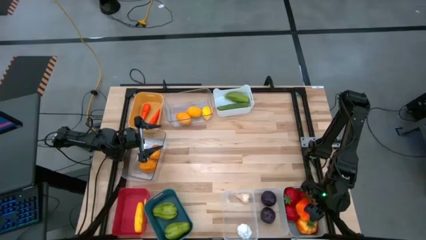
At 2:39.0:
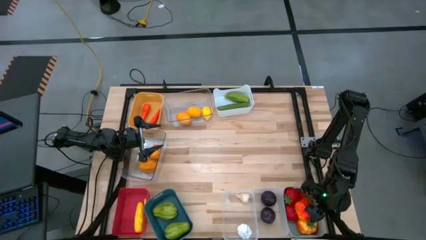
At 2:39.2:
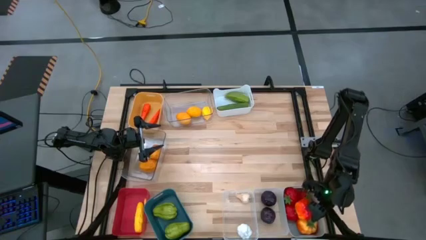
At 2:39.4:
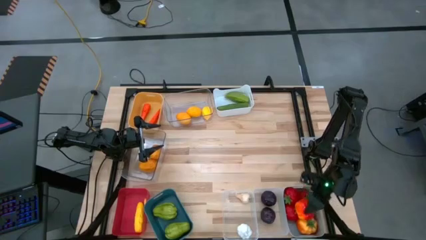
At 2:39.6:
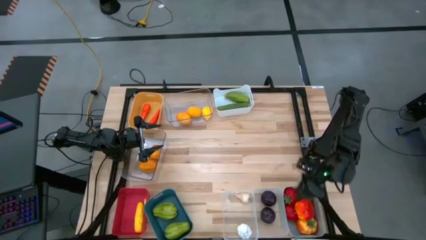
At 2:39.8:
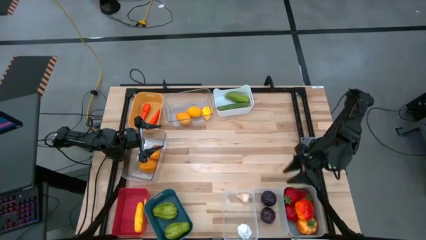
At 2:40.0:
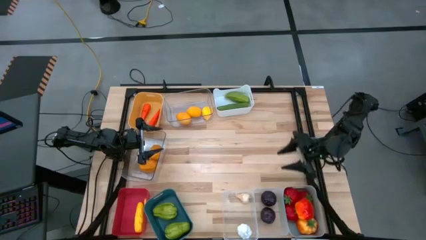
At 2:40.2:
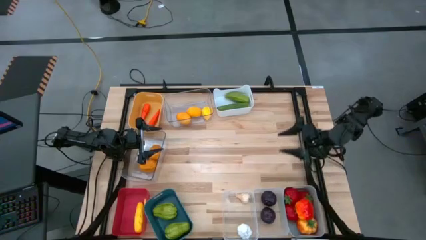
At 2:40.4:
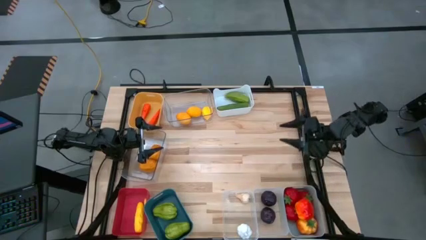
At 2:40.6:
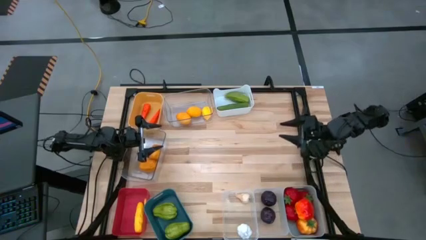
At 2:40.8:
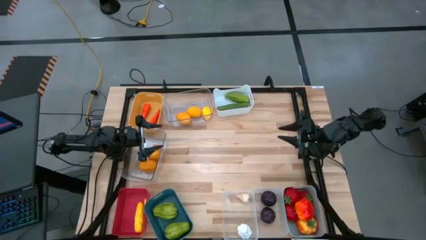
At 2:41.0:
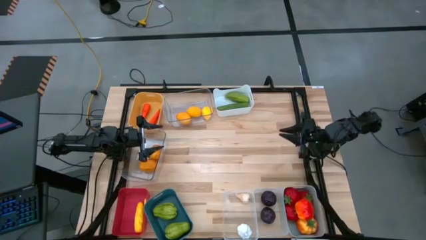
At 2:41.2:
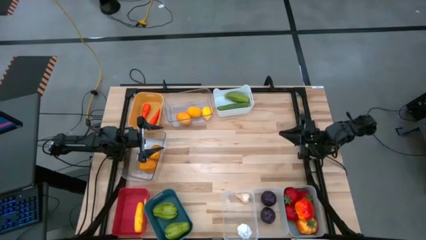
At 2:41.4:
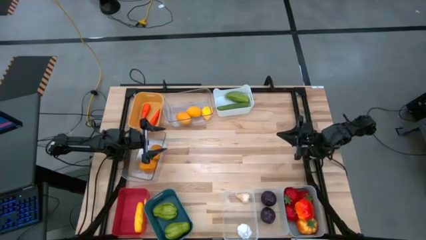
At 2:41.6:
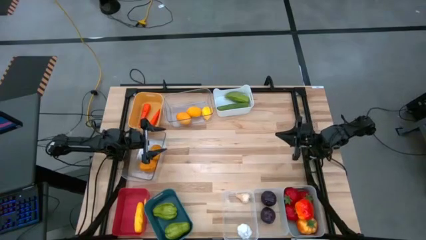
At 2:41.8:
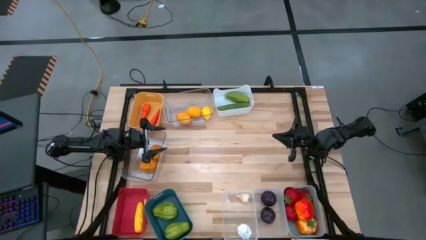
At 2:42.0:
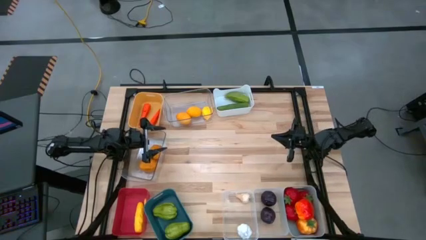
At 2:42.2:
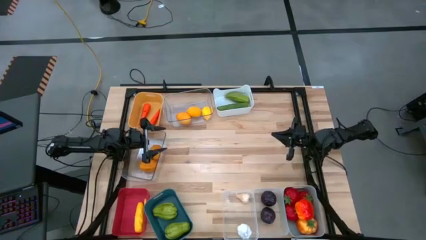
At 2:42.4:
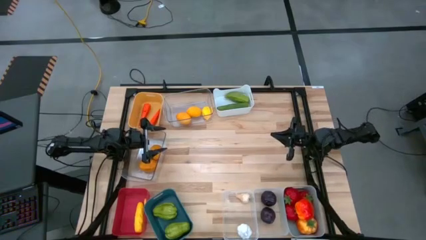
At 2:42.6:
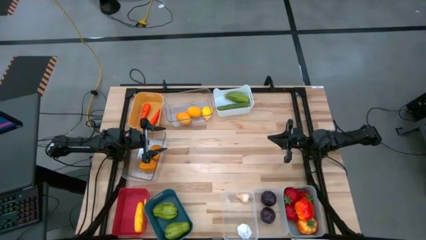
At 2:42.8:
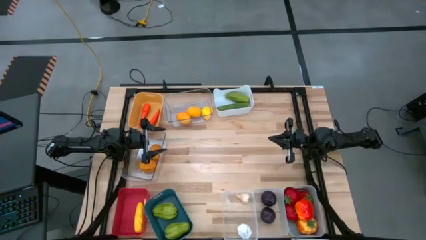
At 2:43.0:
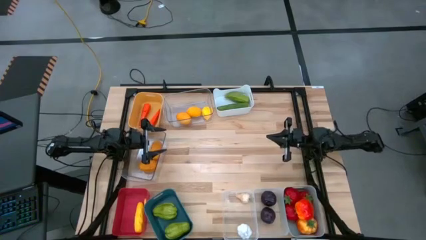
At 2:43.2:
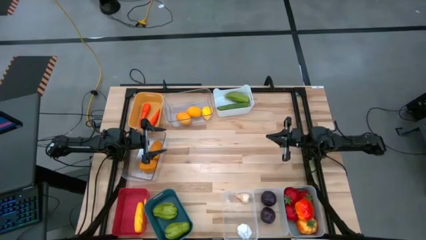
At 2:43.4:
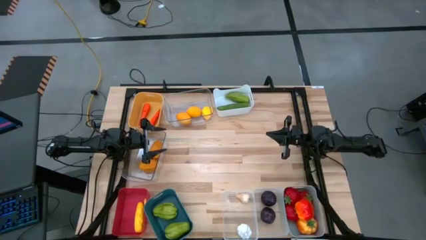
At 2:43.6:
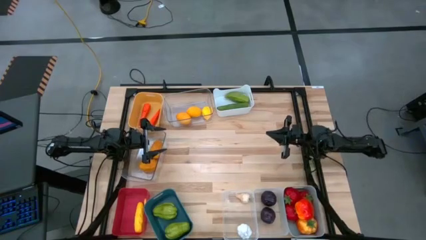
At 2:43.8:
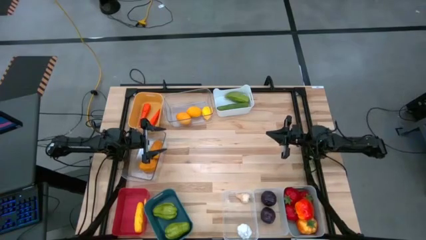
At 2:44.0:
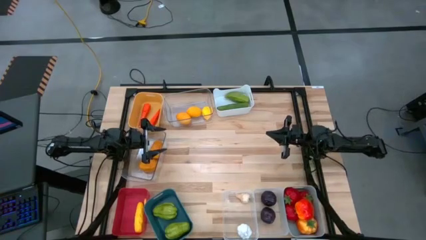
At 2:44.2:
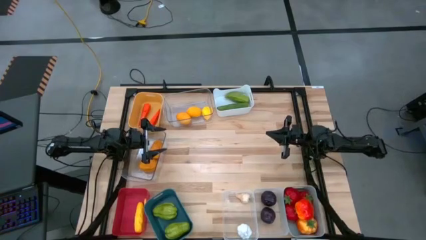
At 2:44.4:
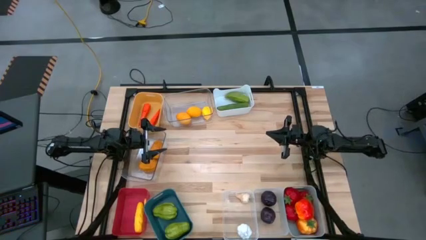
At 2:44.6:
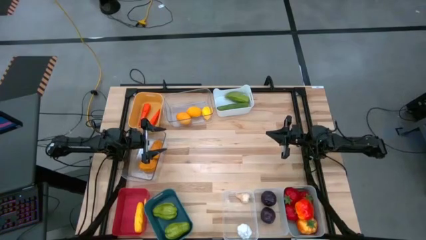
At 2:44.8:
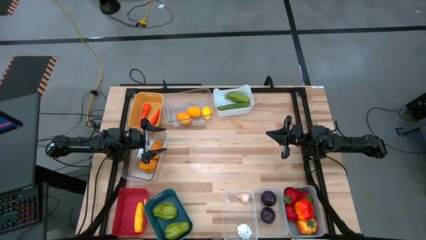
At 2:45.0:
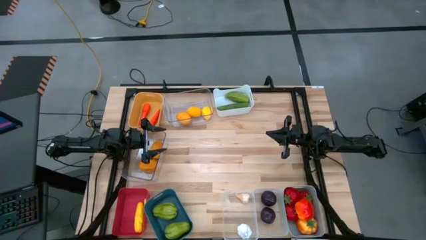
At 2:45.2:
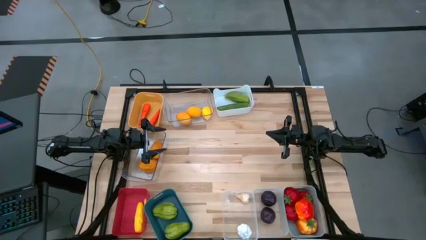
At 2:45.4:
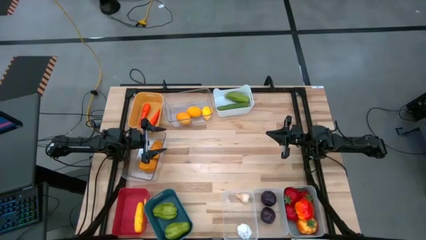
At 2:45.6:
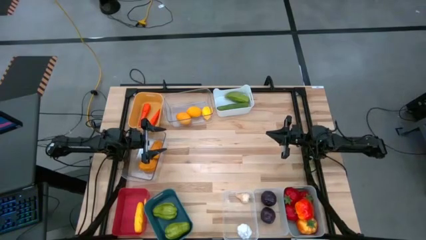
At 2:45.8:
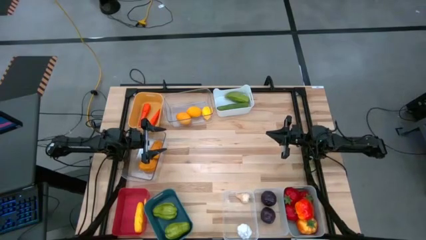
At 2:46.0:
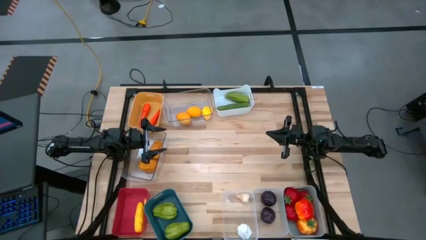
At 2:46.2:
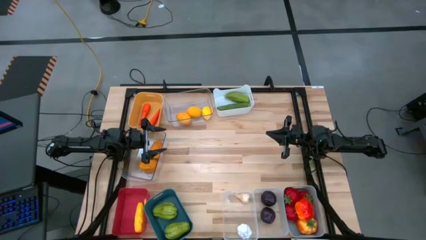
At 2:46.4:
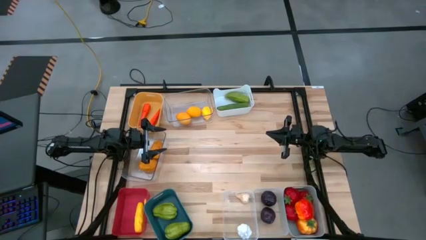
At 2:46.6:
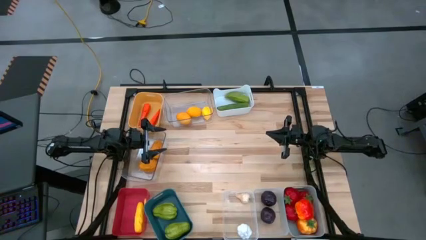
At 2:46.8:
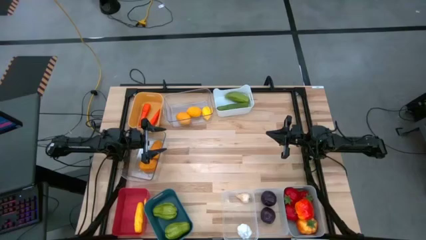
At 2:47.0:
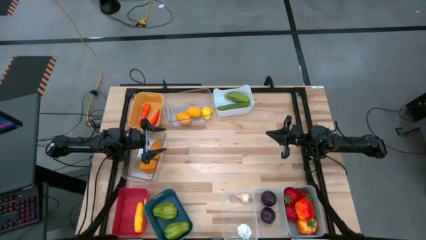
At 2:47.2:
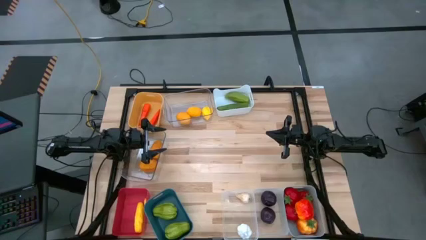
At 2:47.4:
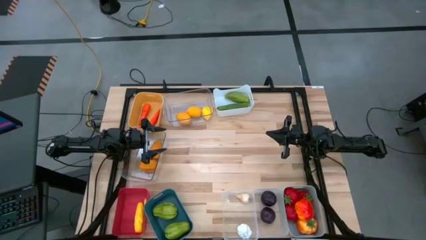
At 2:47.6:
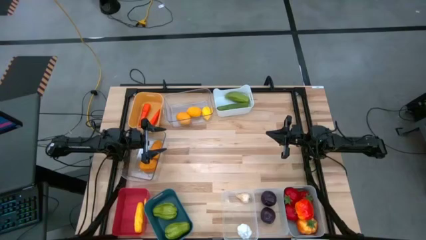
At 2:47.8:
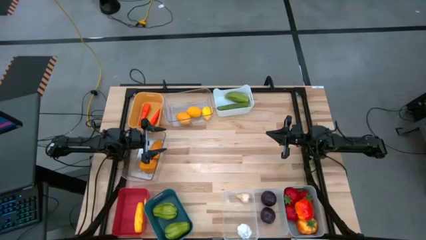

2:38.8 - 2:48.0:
Task: Sort produce into baskets
Return to Home Position
